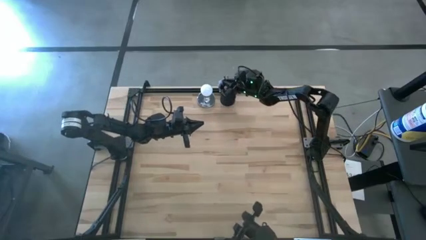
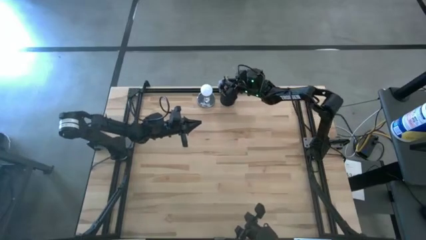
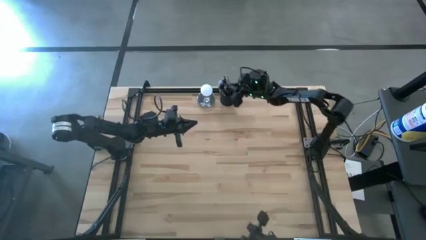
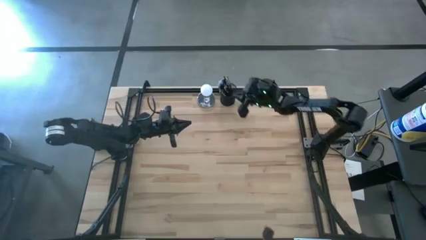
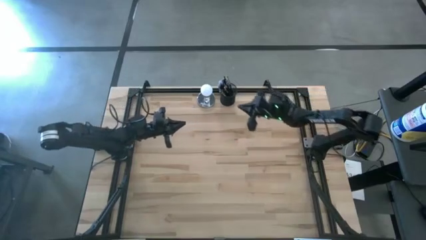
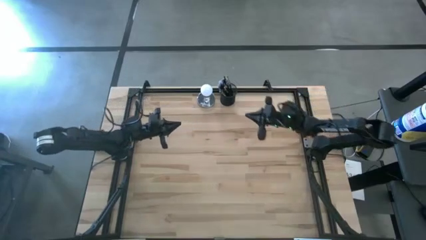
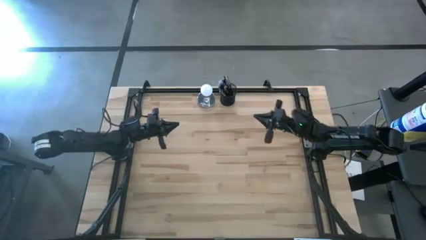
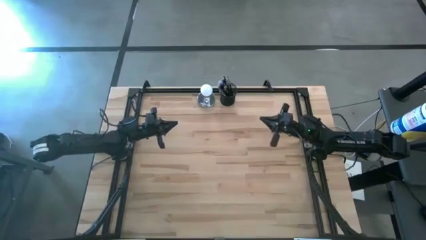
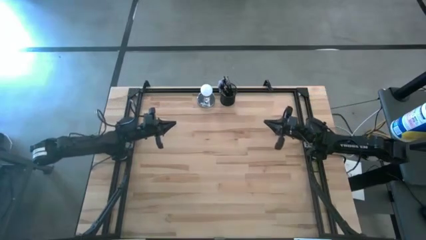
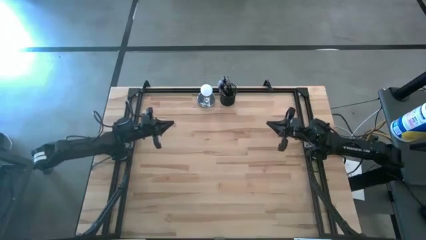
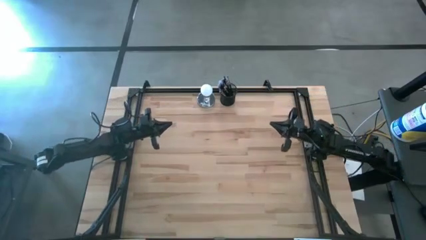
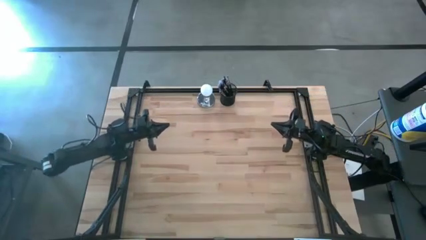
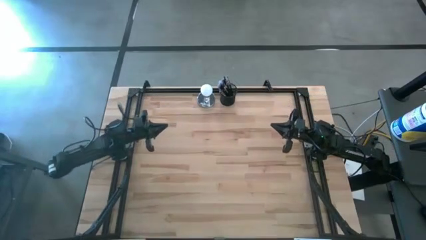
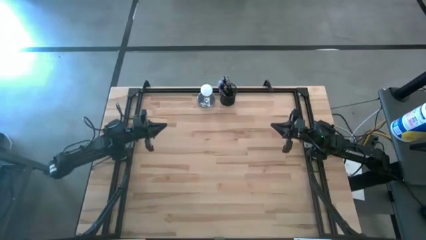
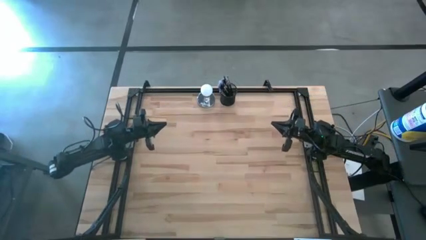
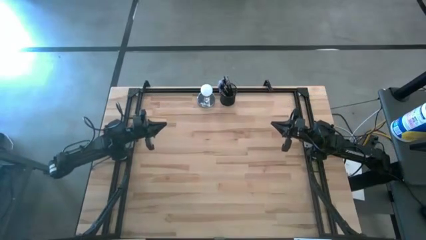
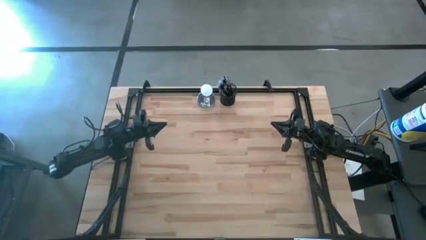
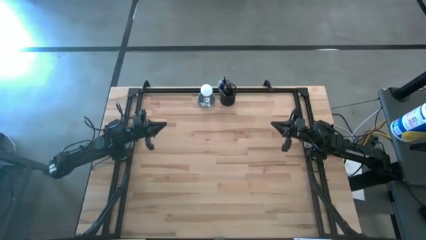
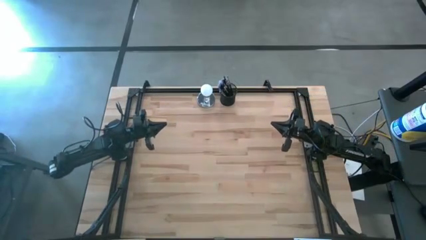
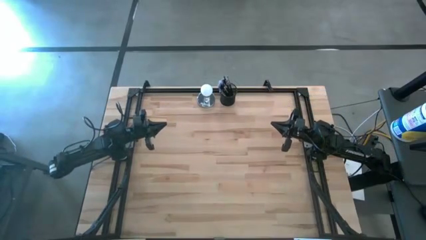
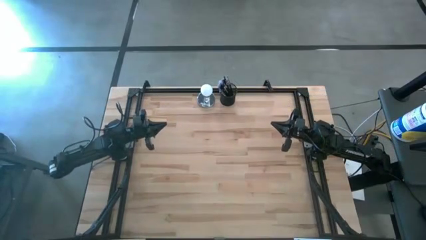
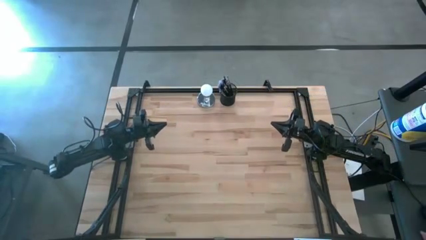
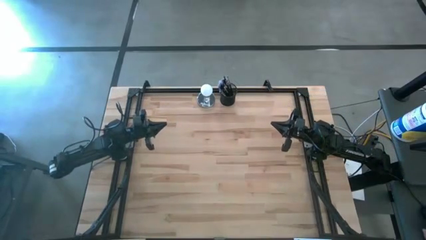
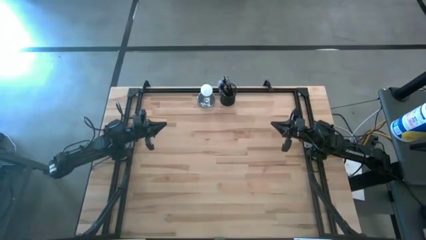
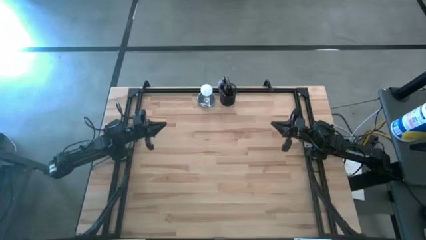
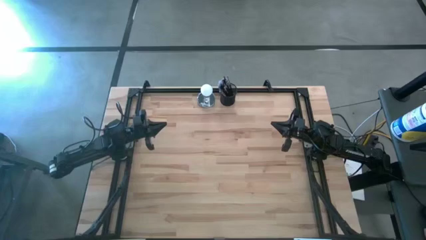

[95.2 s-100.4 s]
Task: Pick & Place Makeup Supplies
Return to Home Position

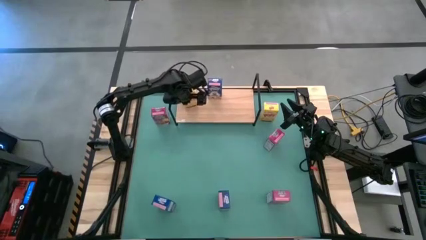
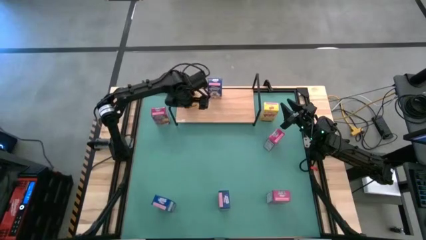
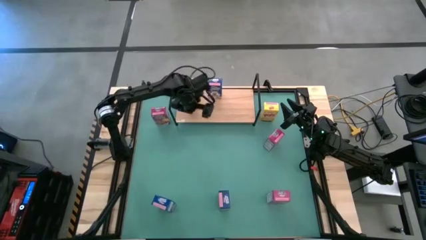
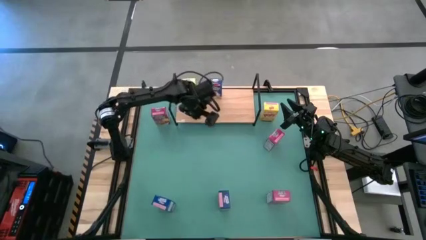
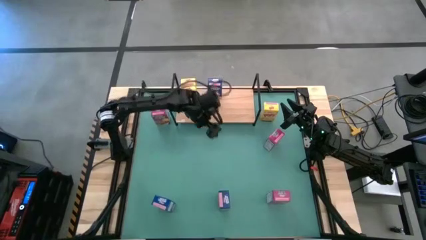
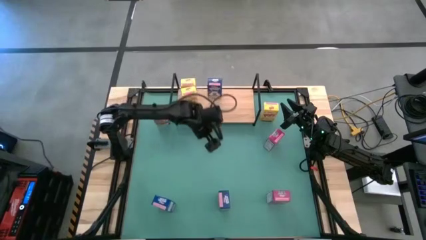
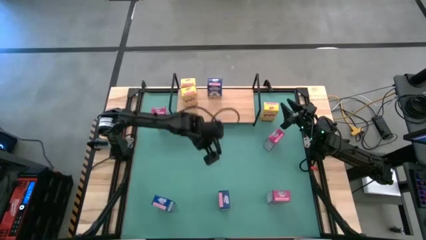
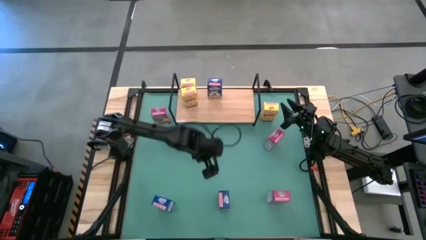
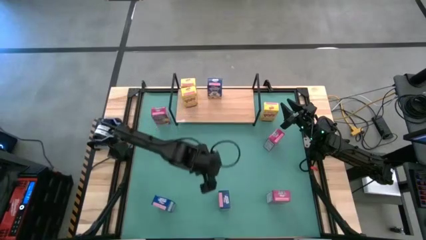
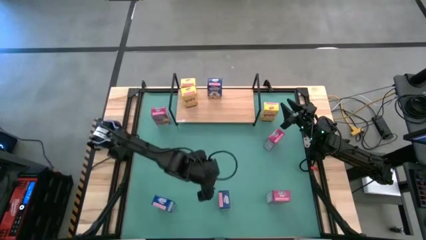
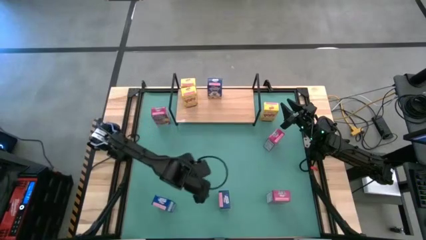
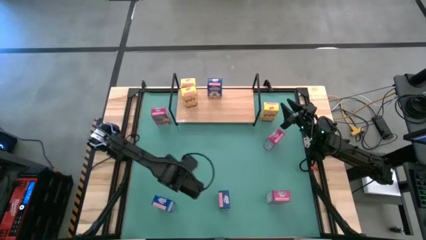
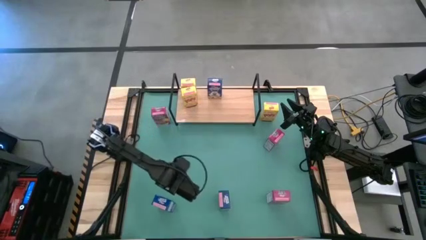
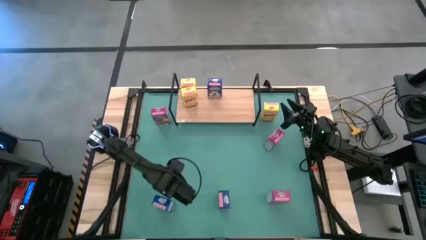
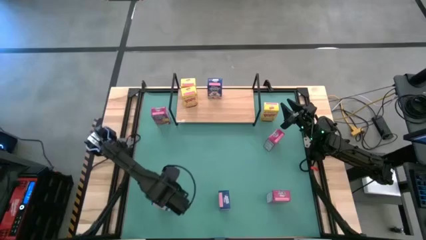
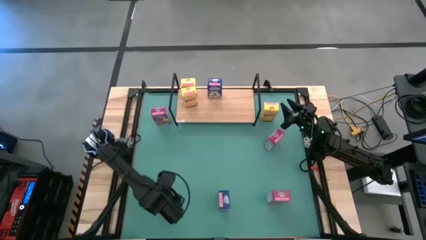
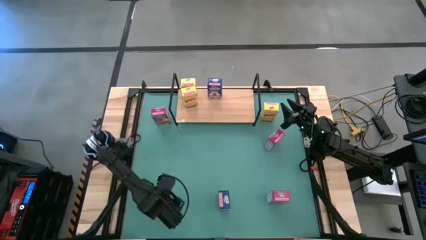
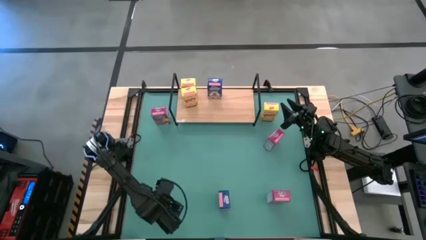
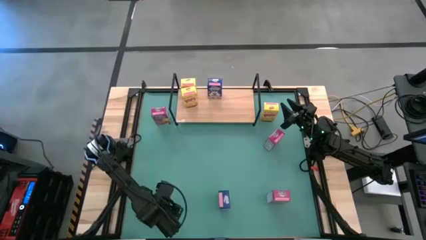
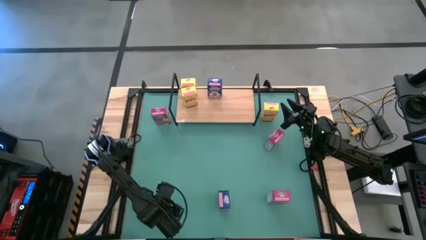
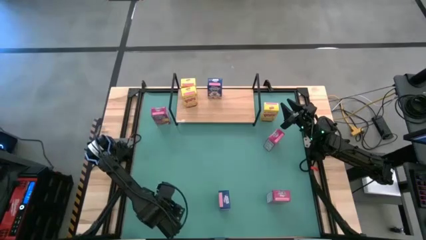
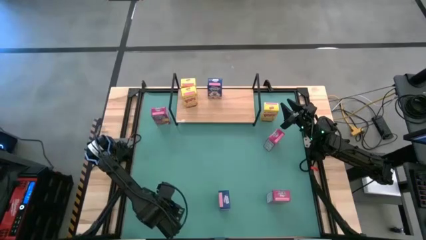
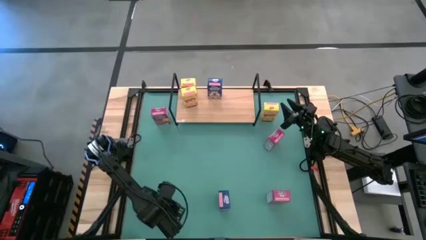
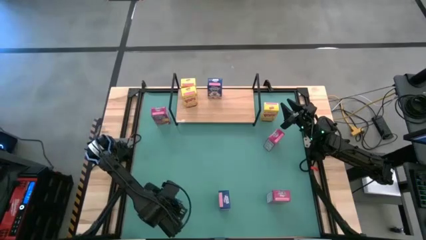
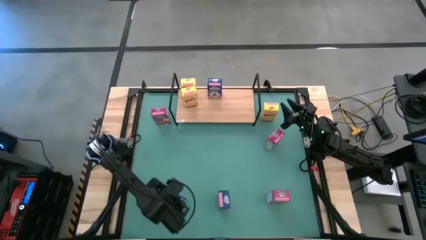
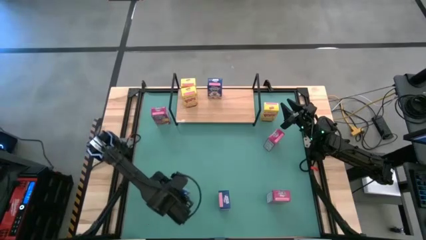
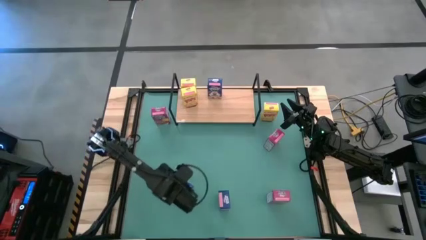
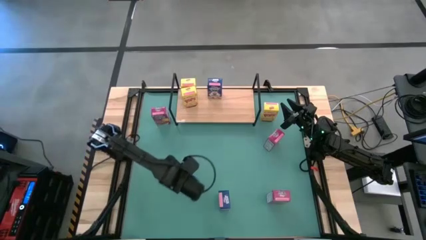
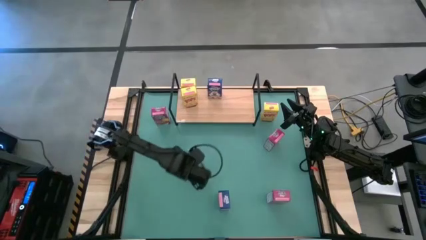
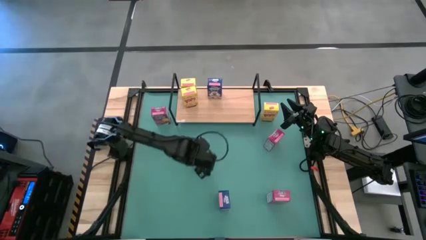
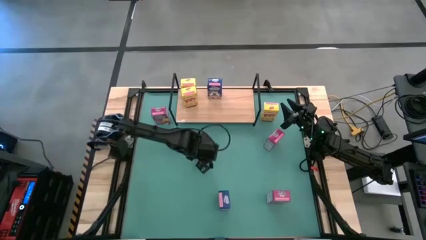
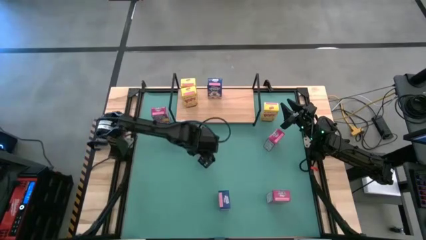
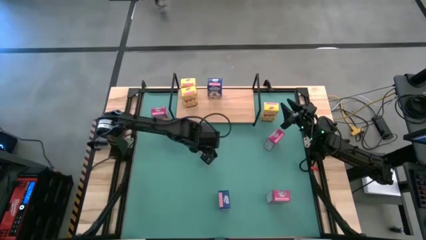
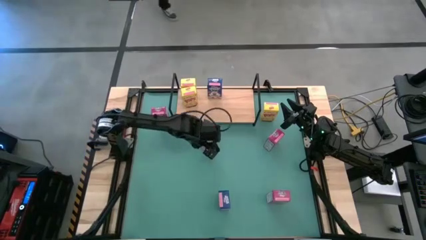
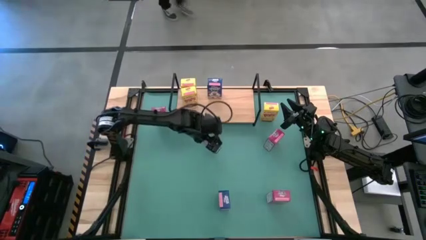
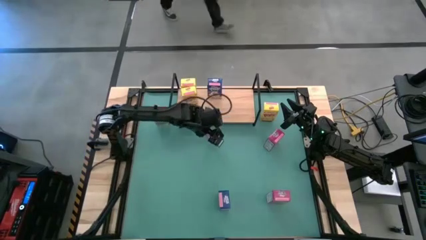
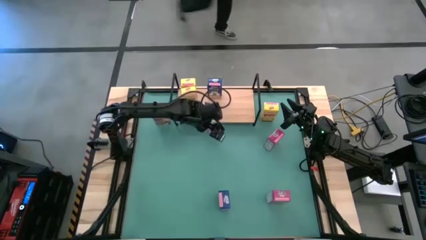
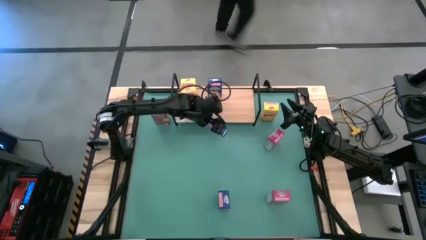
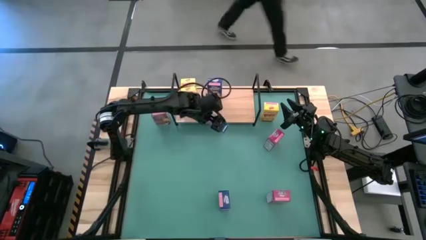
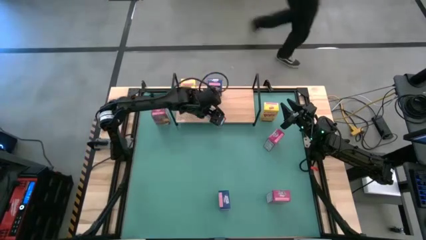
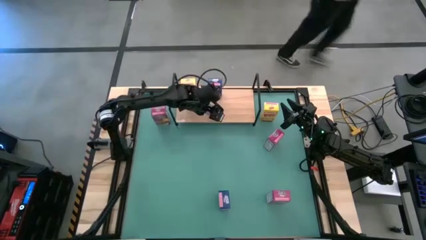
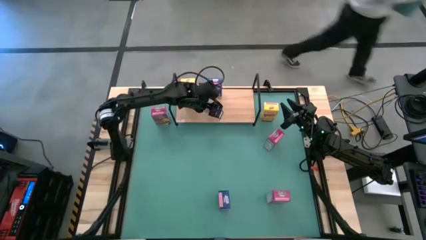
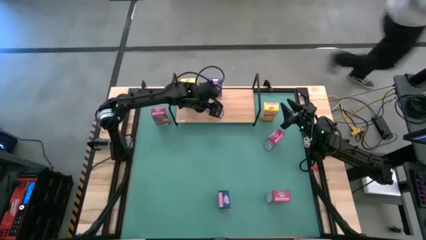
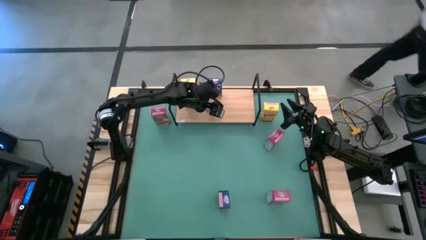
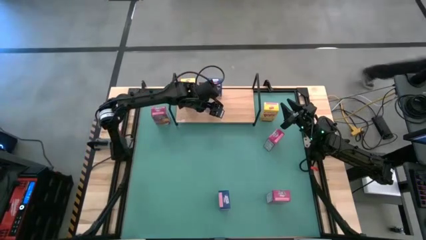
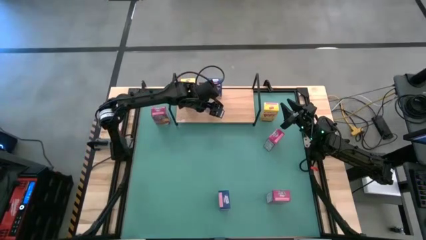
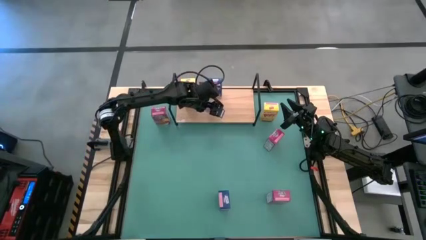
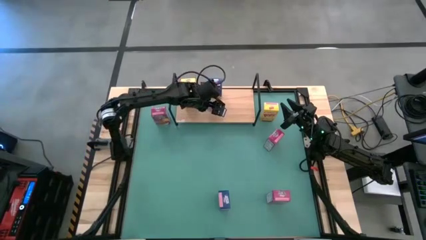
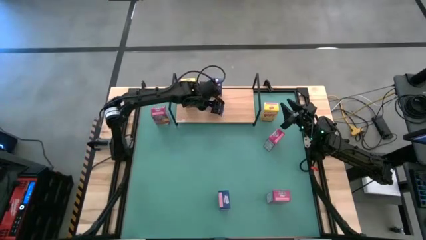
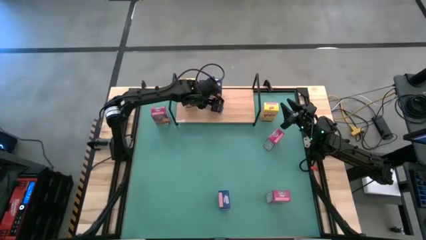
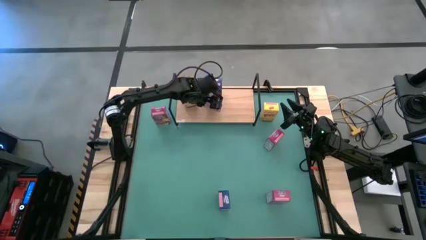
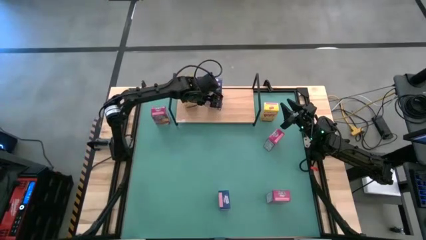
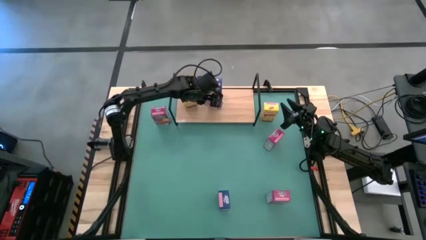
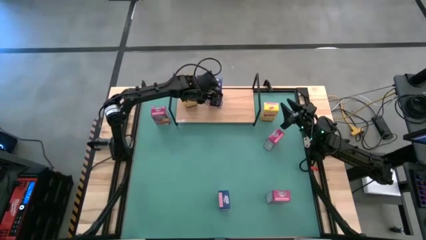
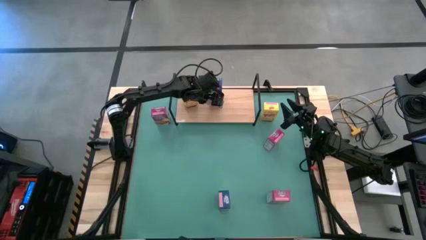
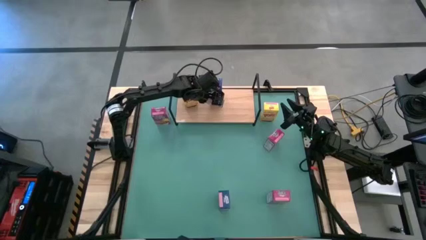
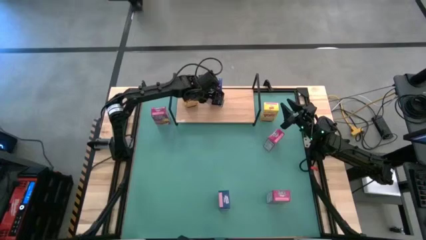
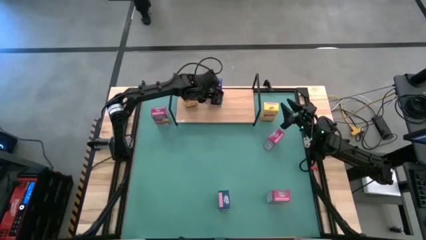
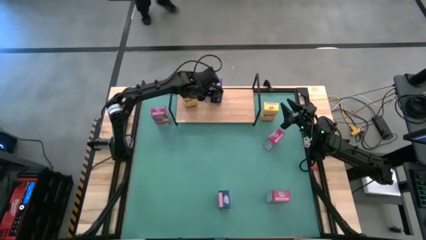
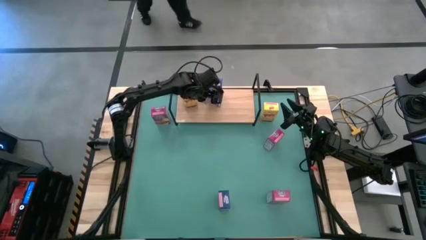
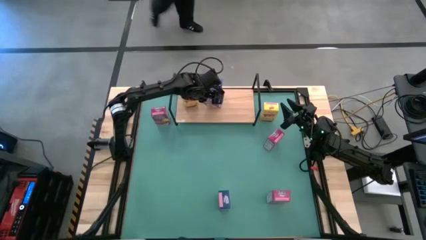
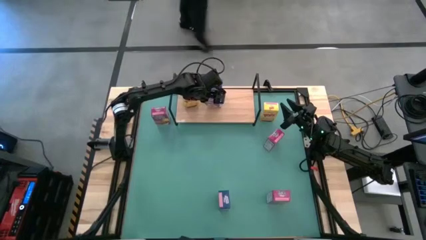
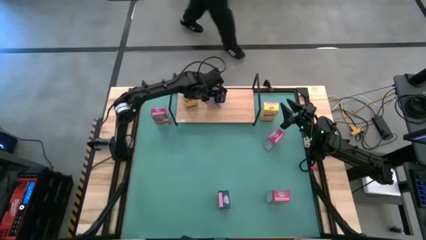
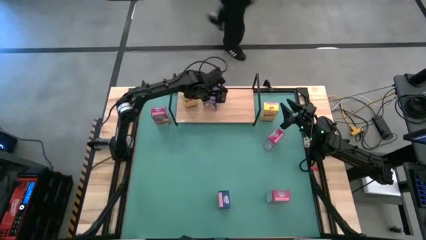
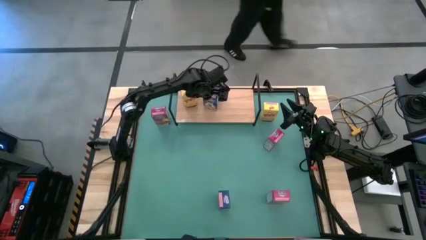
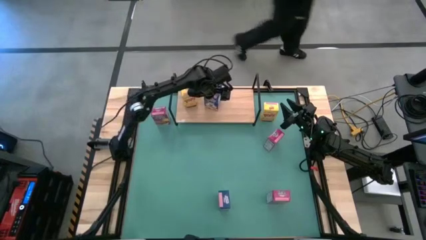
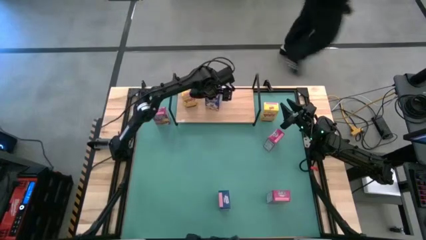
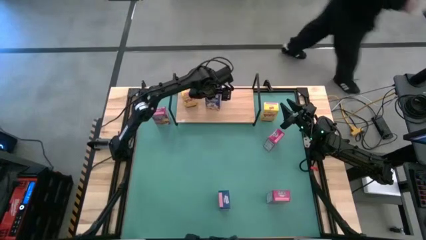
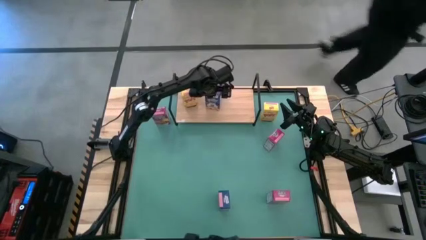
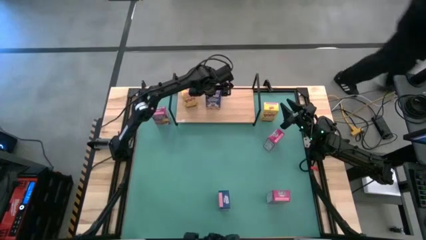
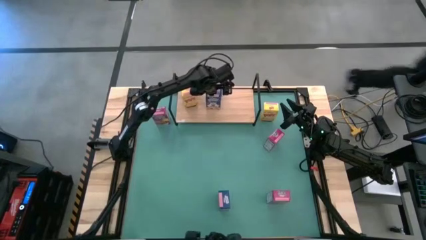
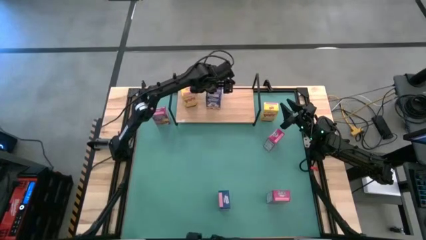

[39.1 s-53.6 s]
Task: Stack cereal on shelf
Put the left blue cereal box on the shelf aligned with the other blue cereal box
